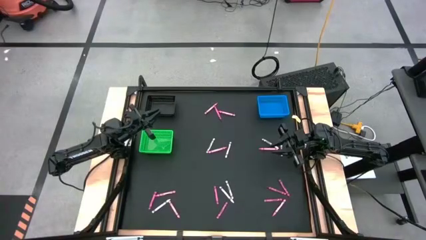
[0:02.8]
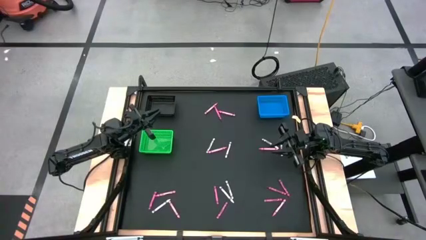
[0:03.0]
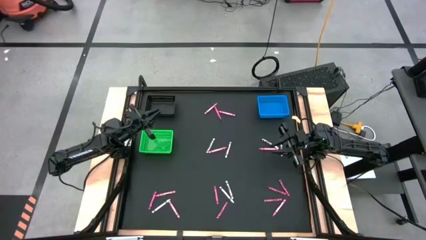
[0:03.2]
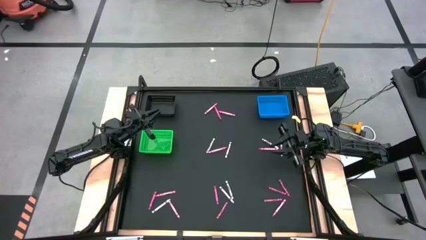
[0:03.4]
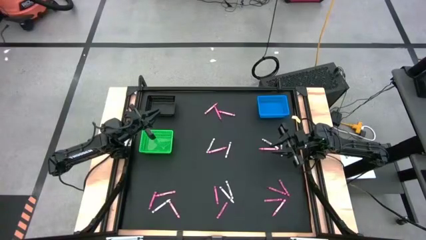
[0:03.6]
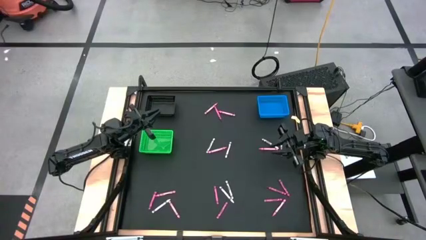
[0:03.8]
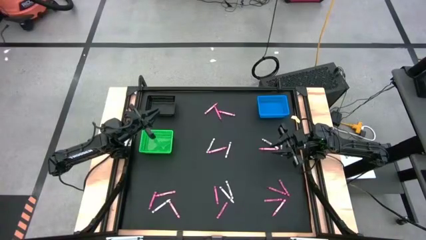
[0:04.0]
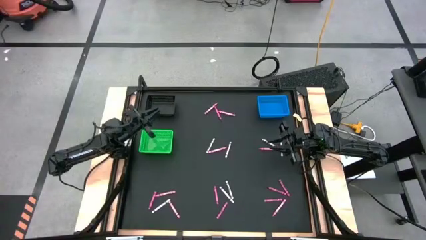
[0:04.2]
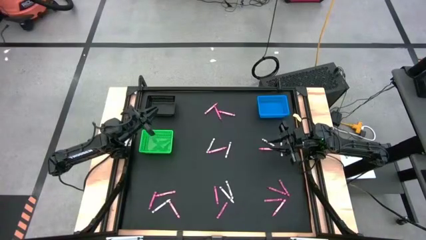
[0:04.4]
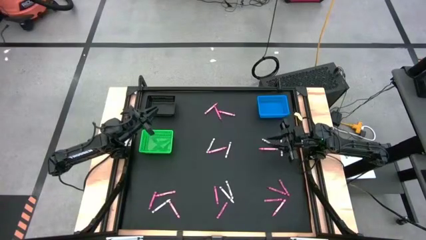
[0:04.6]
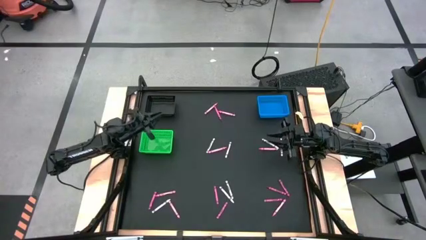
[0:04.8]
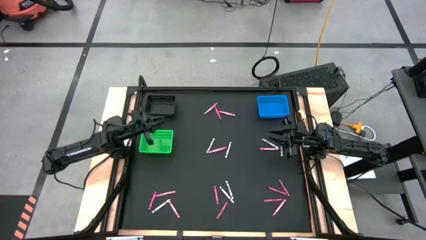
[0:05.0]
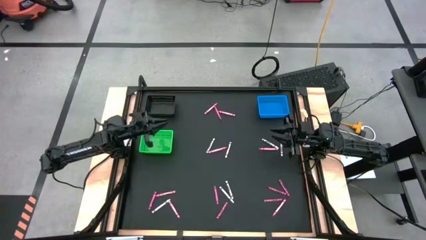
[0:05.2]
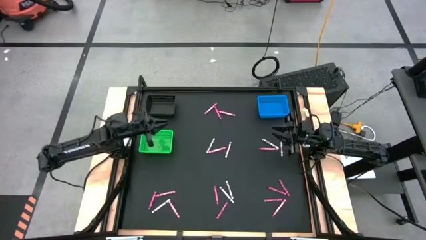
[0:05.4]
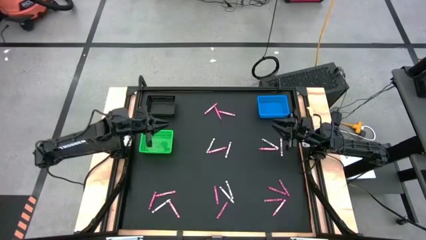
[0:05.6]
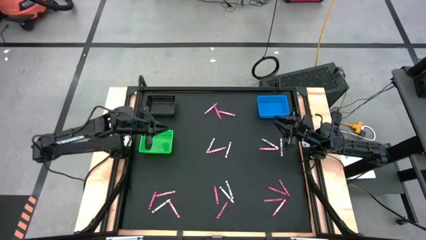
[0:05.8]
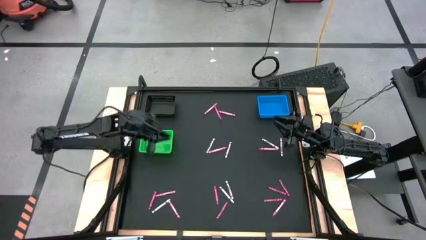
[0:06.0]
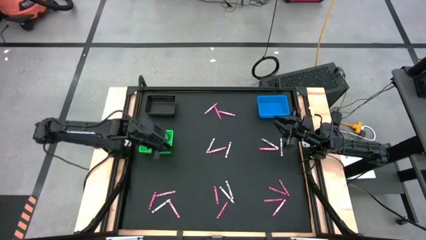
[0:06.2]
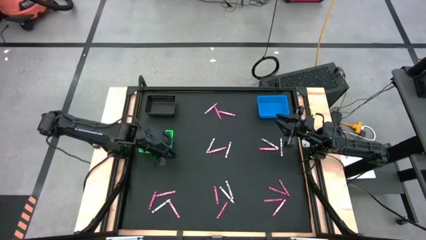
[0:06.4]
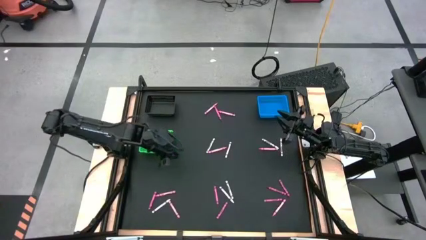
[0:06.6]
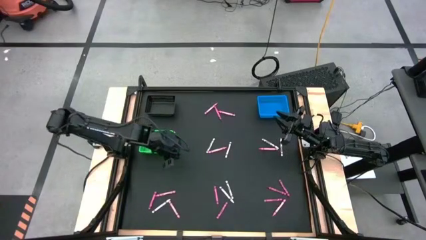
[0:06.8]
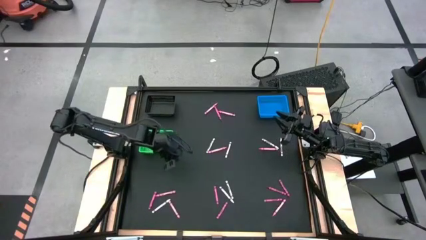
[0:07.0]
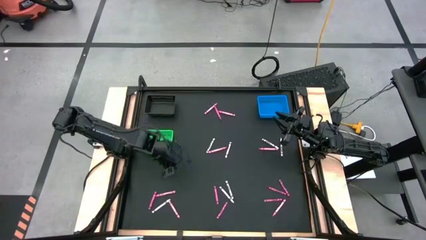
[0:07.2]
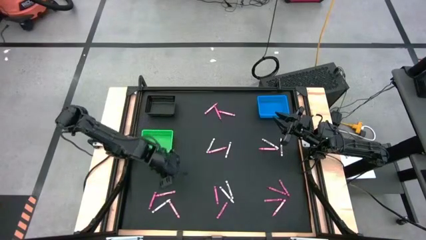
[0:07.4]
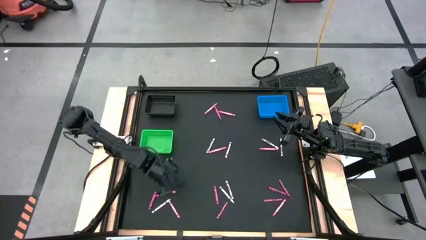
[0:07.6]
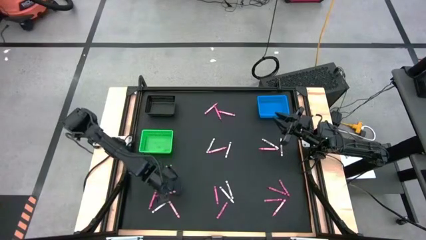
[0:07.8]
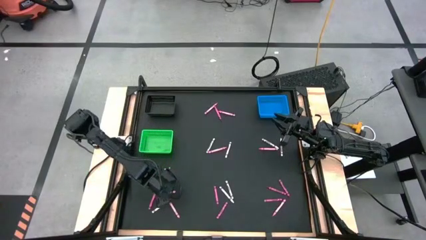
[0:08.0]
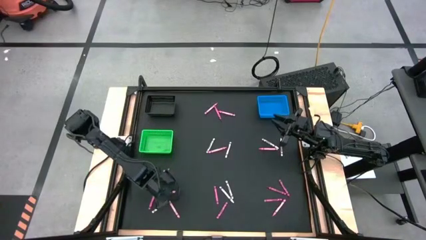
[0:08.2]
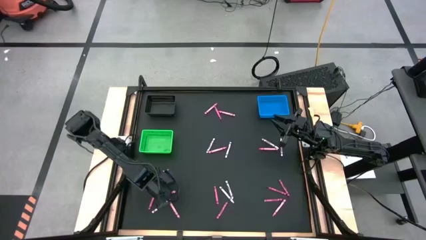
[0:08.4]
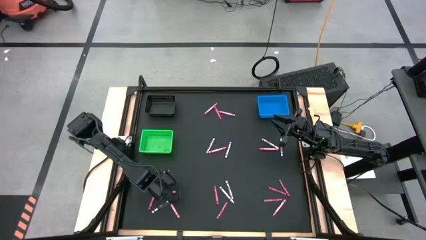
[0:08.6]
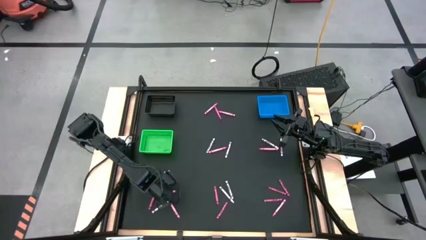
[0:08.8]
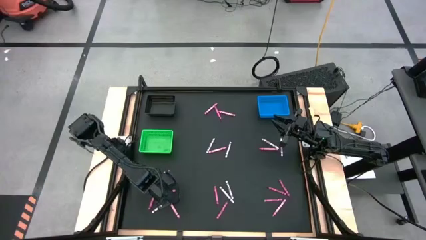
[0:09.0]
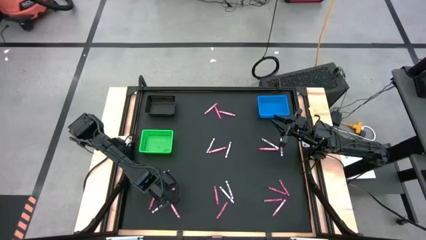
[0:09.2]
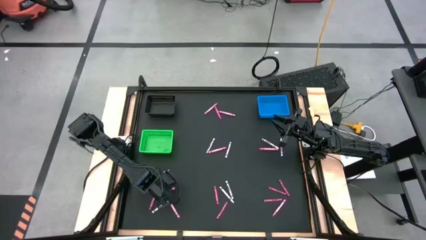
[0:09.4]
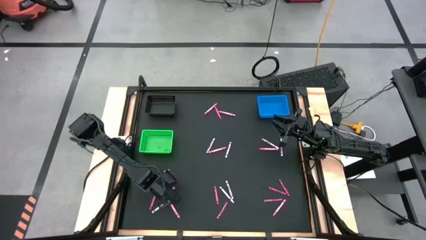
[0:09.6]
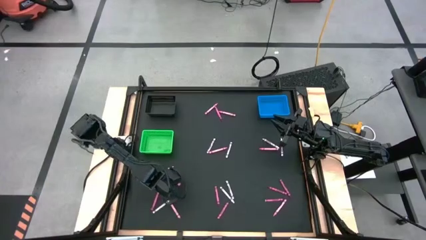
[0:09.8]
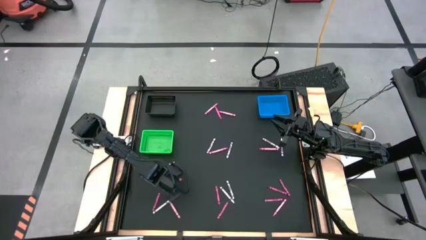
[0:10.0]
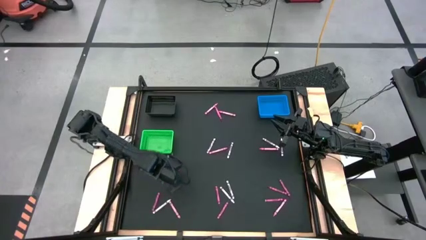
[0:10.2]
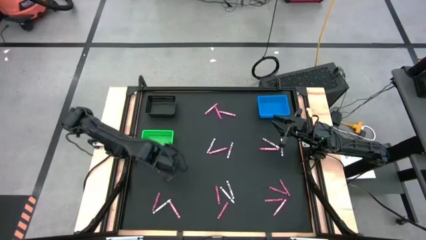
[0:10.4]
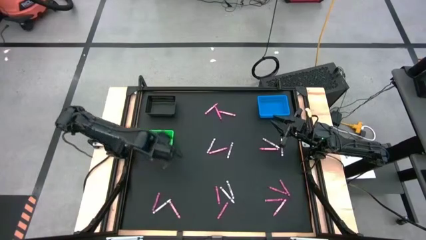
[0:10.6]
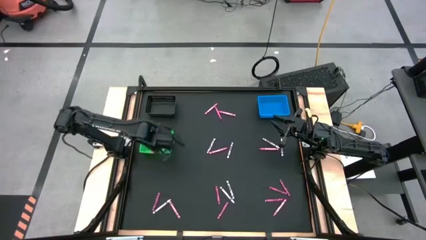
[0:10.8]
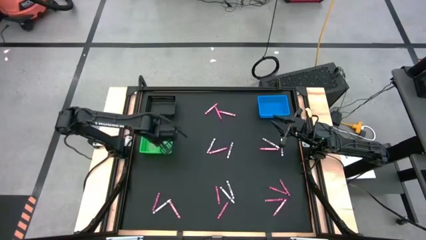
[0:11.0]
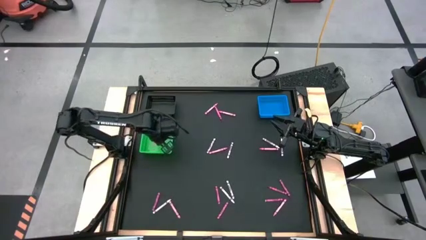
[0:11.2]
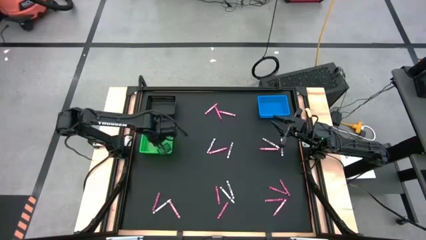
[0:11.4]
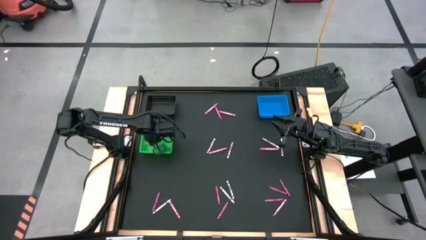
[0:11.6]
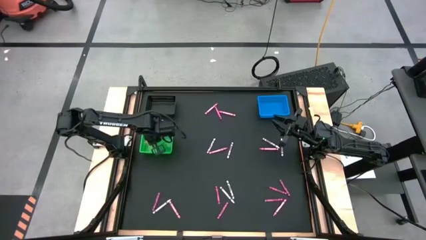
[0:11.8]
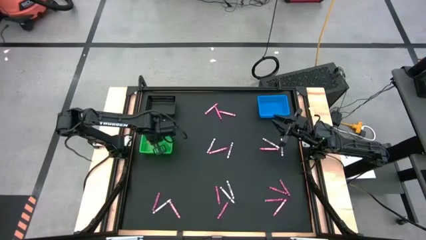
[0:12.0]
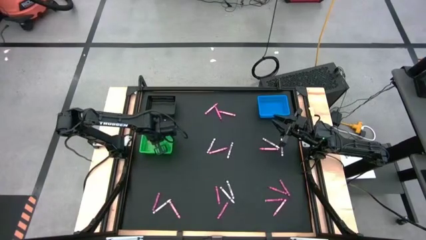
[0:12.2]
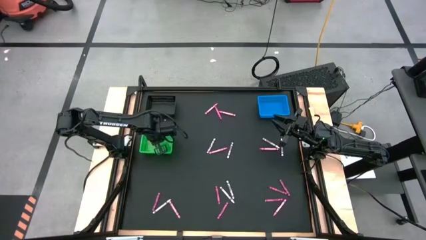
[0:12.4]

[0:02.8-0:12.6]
Task: Sort crayons
Put the pink crayon into the green bin

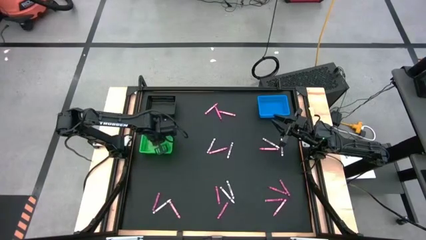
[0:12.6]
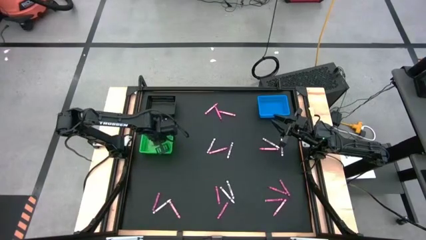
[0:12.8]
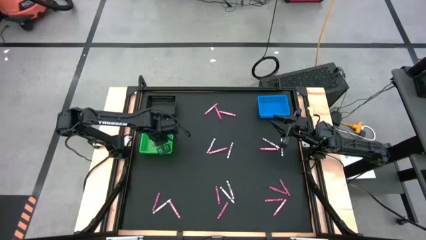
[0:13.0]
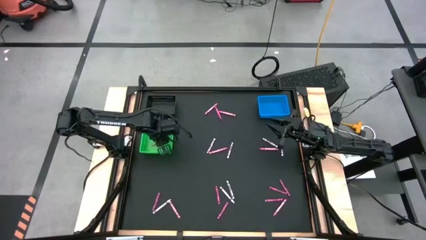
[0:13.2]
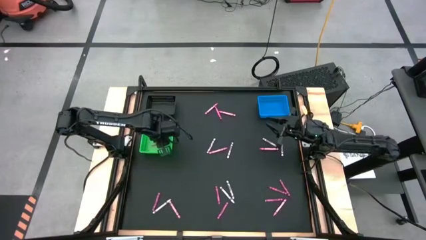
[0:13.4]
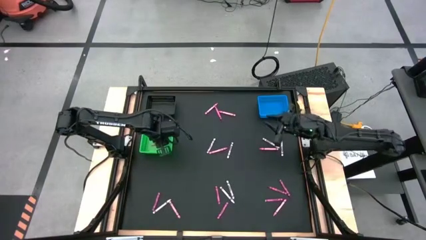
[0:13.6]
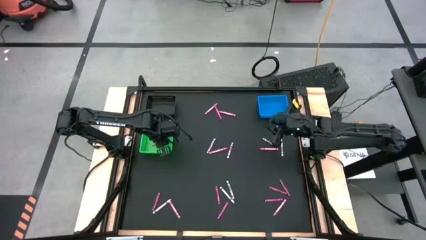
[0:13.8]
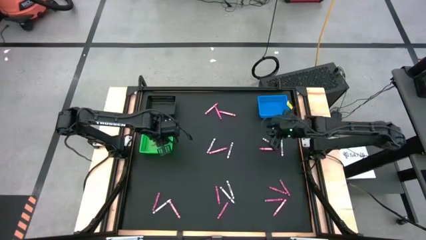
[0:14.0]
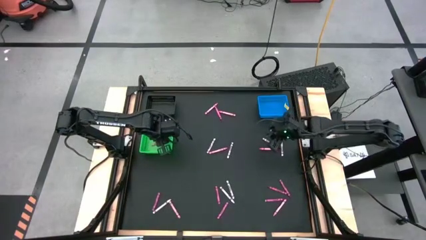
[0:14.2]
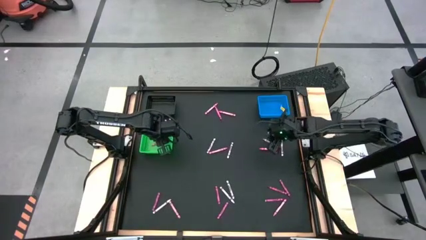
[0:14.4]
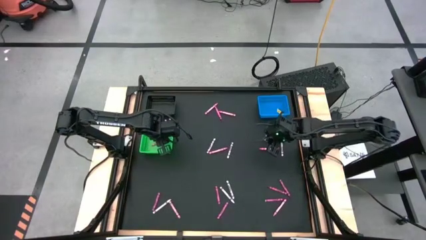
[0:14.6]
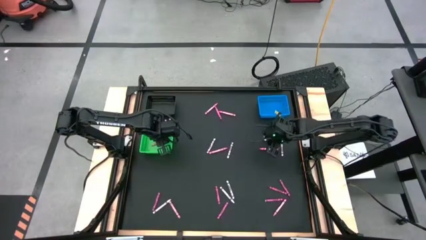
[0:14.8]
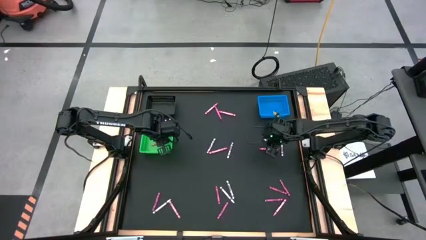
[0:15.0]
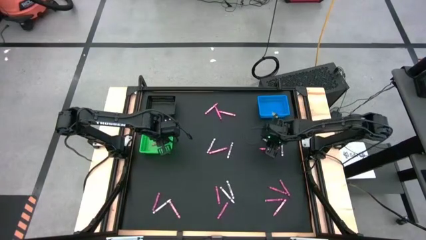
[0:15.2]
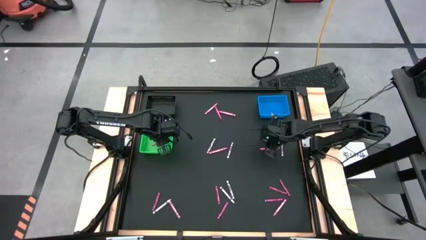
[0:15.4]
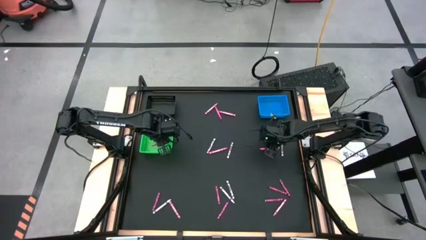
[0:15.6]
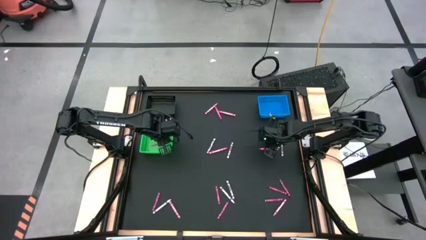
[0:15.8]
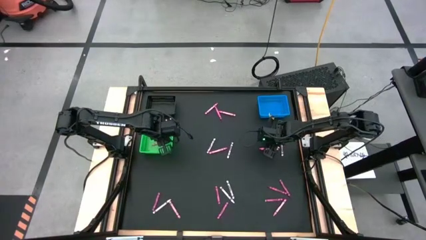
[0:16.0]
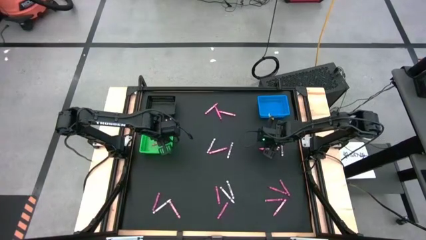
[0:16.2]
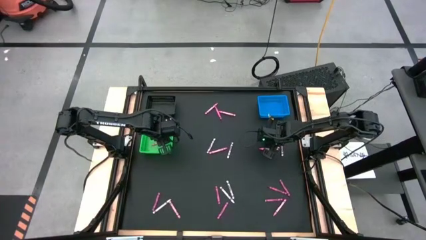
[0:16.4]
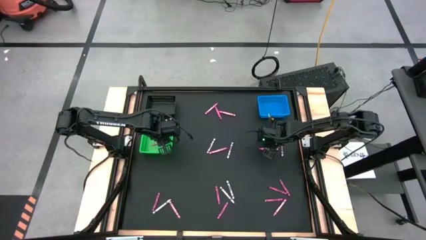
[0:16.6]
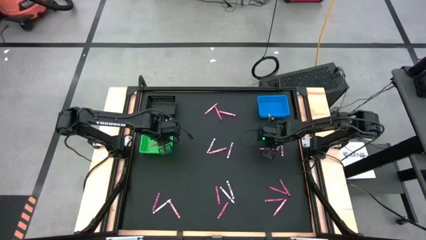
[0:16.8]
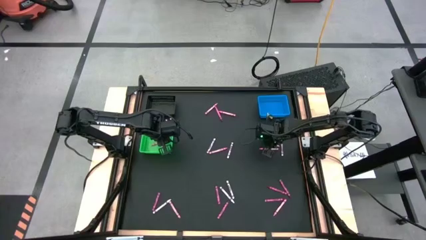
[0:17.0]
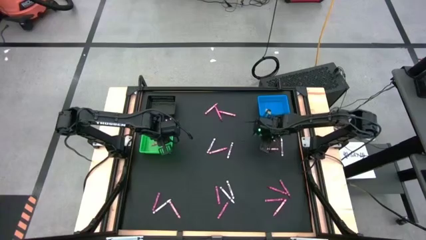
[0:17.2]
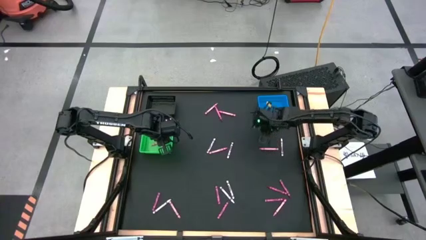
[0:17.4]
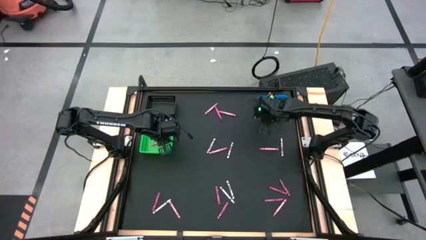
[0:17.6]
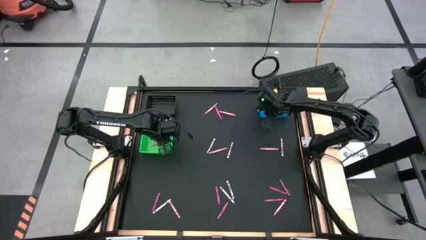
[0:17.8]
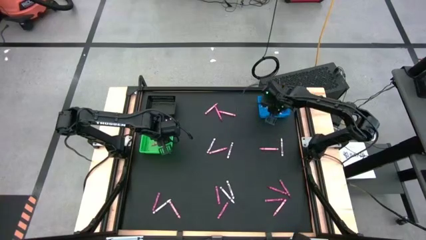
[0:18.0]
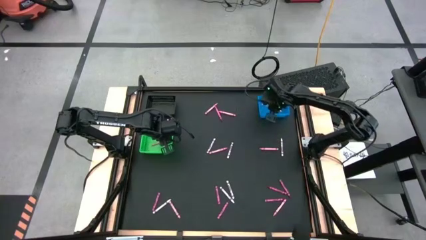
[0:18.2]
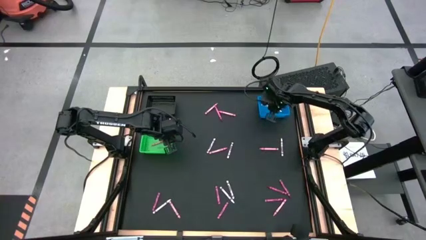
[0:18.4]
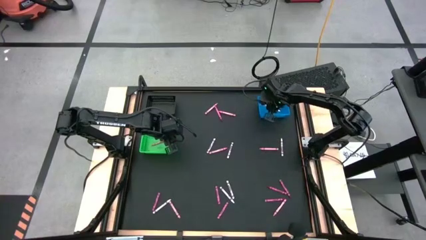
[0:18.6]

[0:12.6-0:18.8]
Put the white crayon into the blue bin
